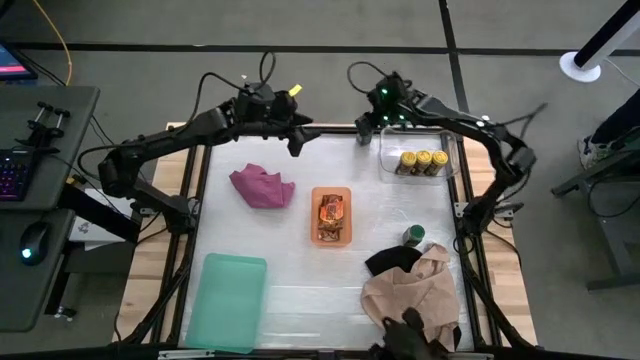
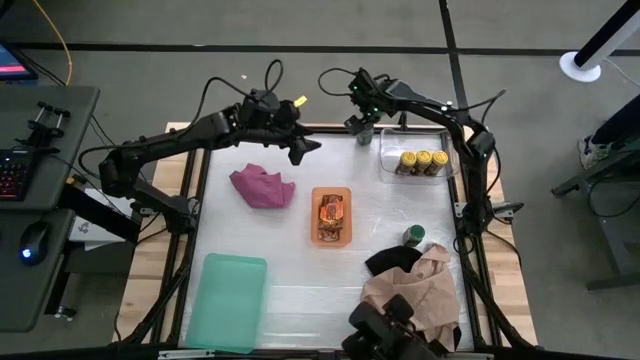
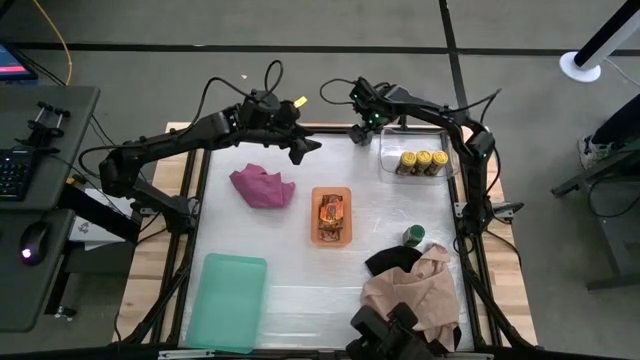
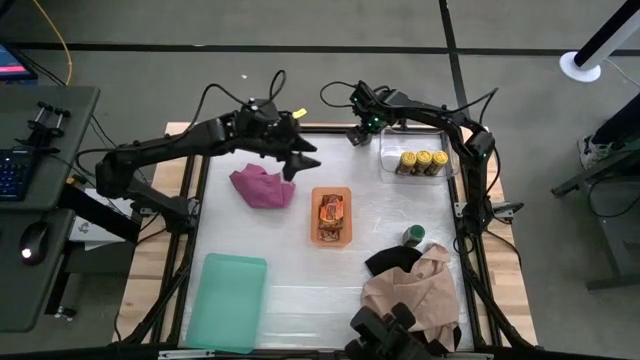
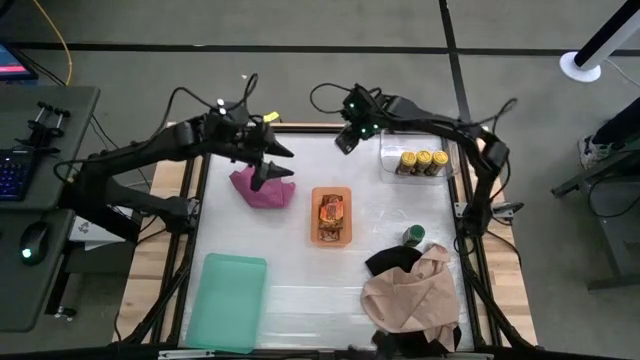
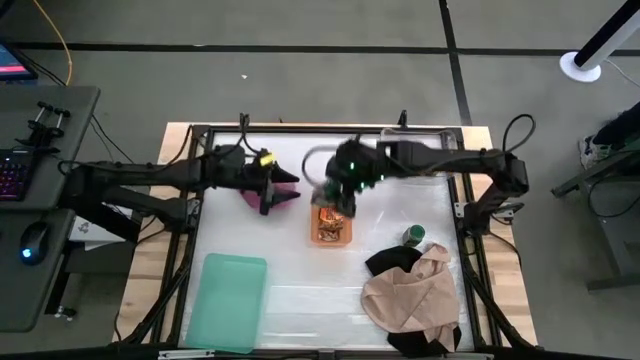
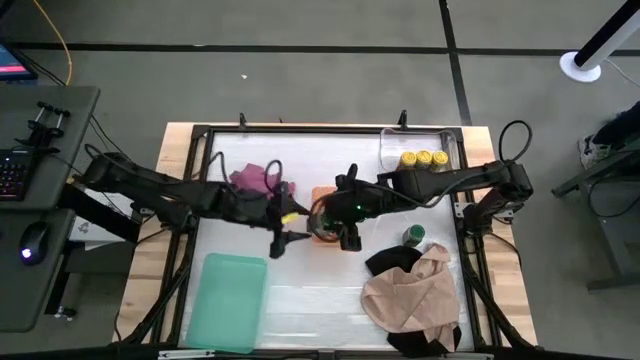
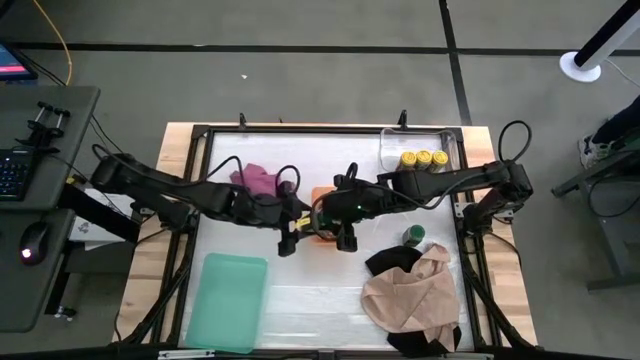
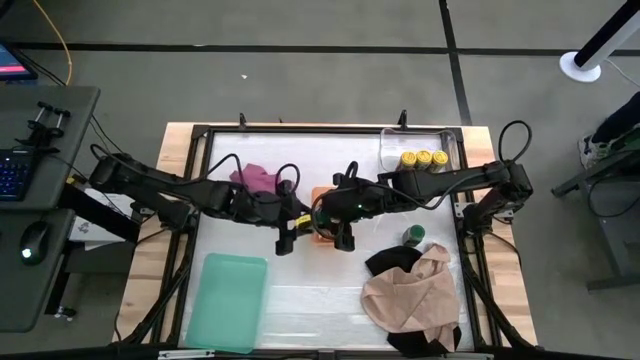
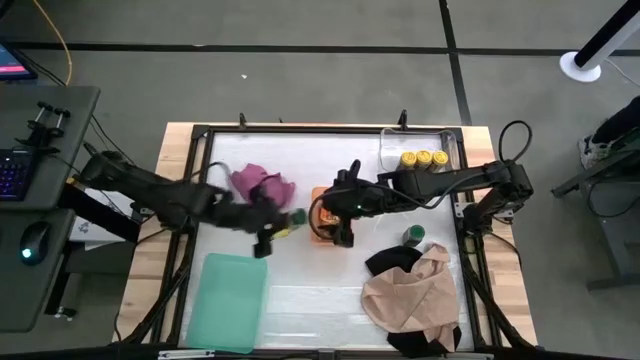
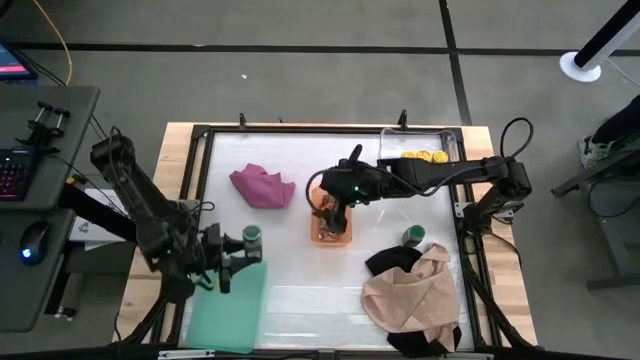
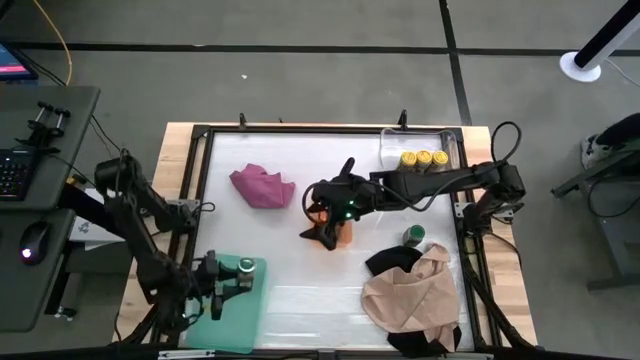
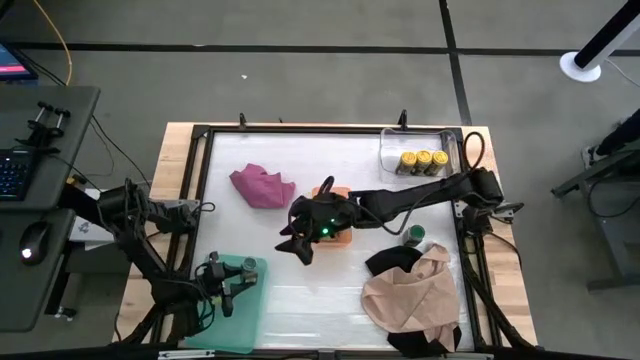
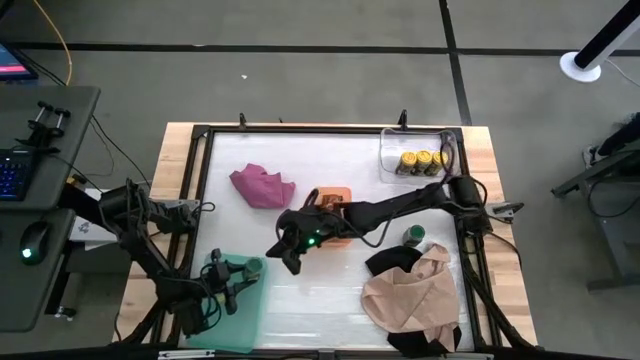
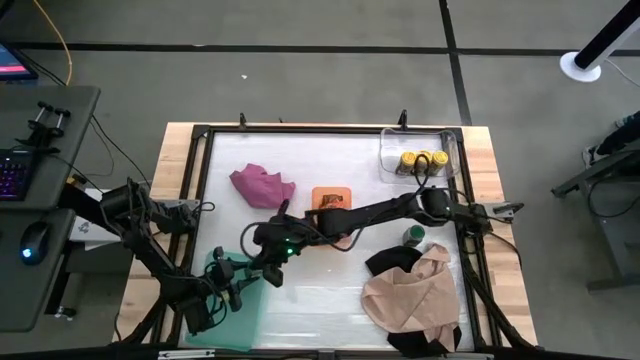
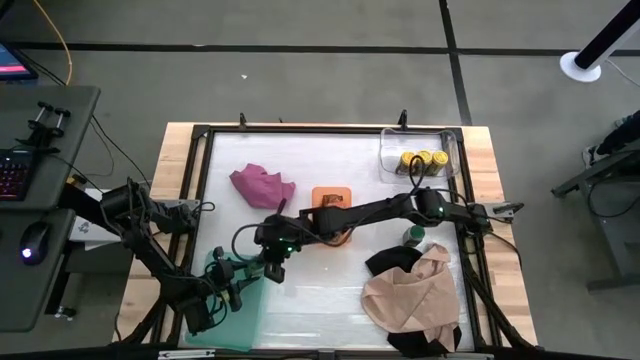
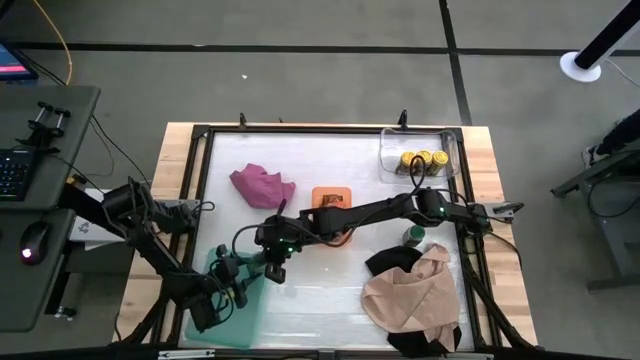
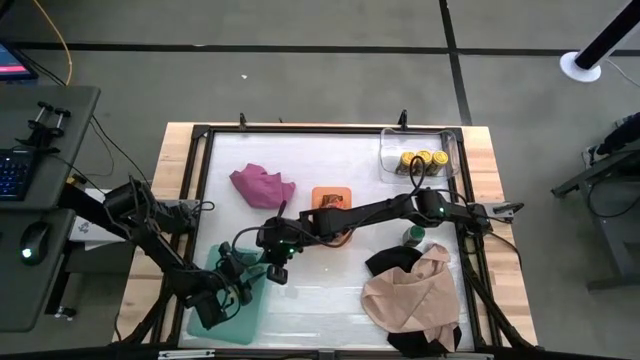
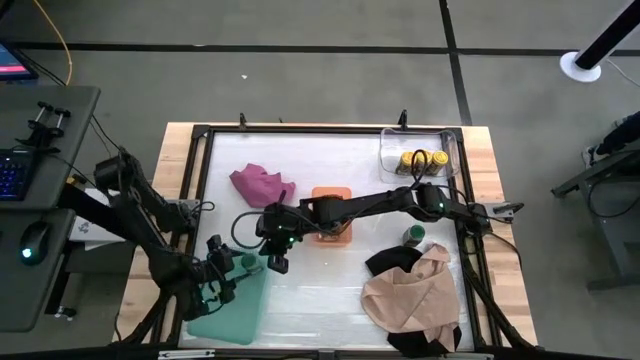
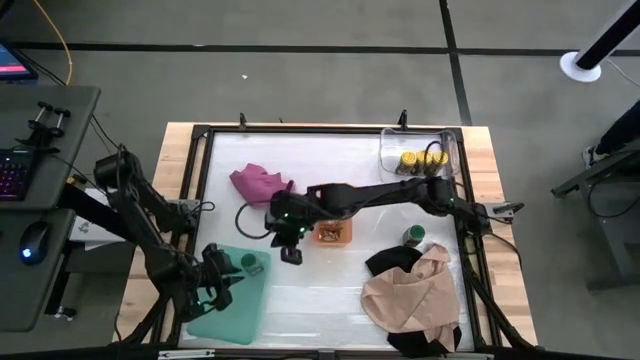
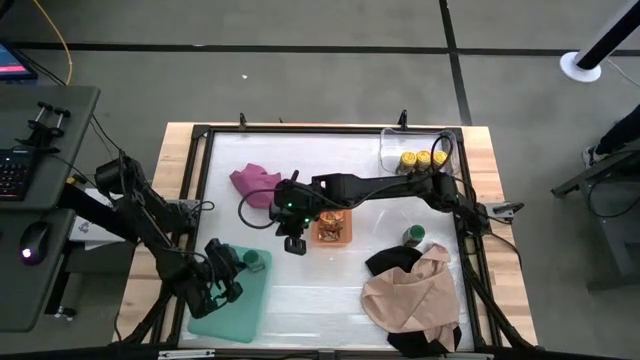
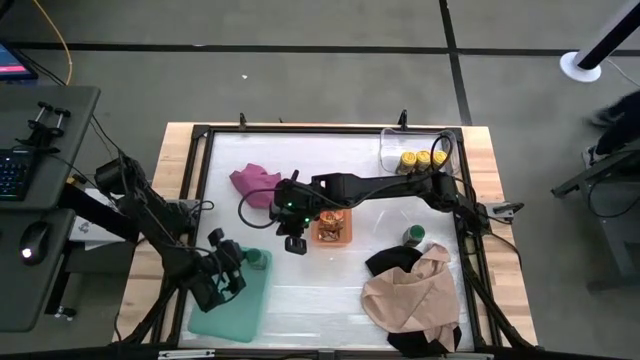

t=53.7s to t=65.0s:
Task: Sort spices by type
Put the top green seasoning bottle into the green bin

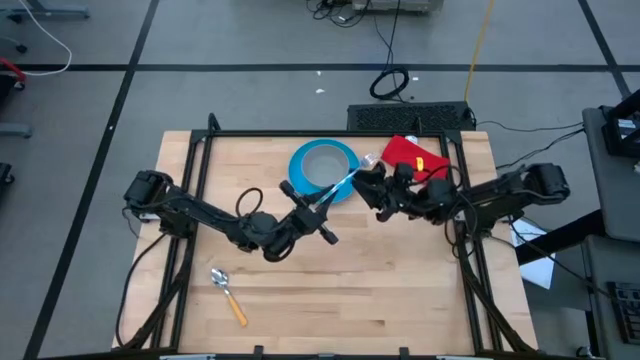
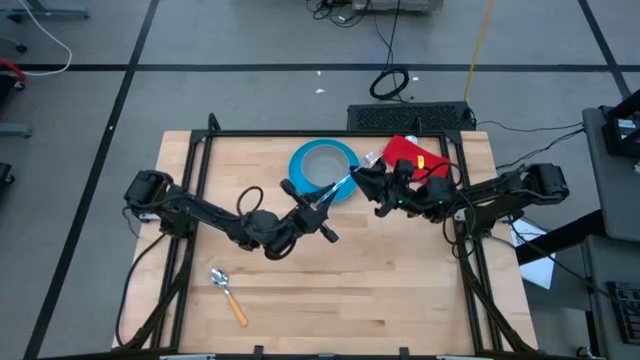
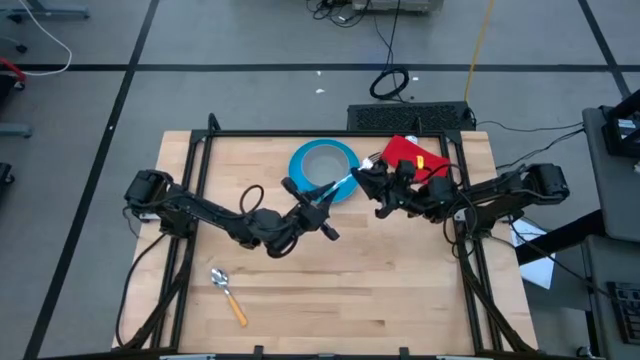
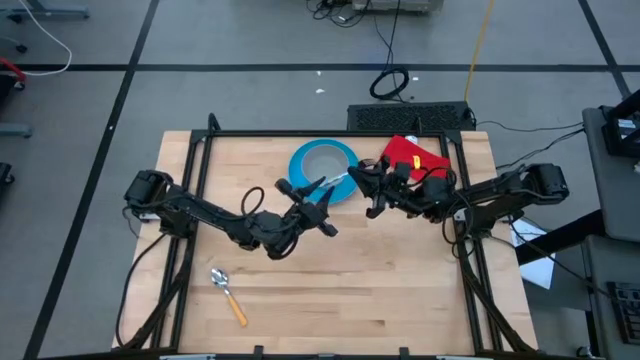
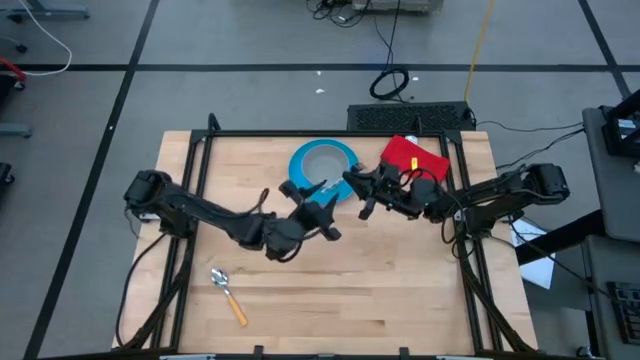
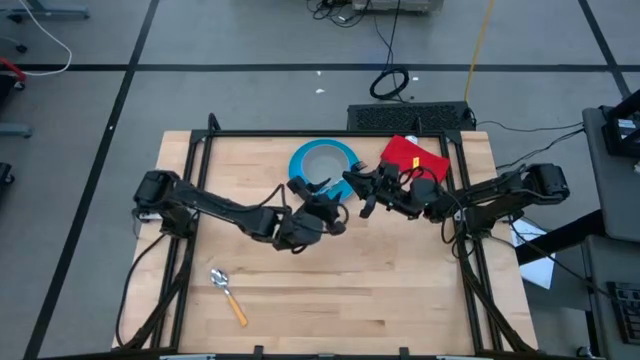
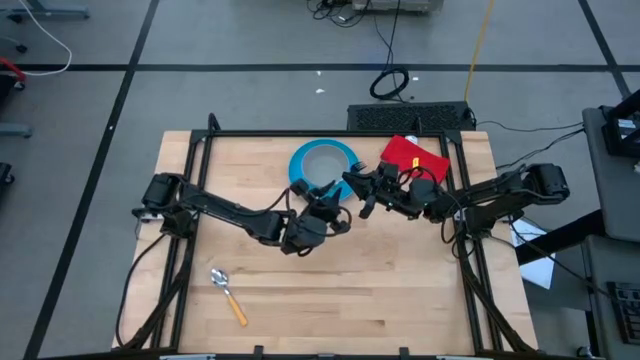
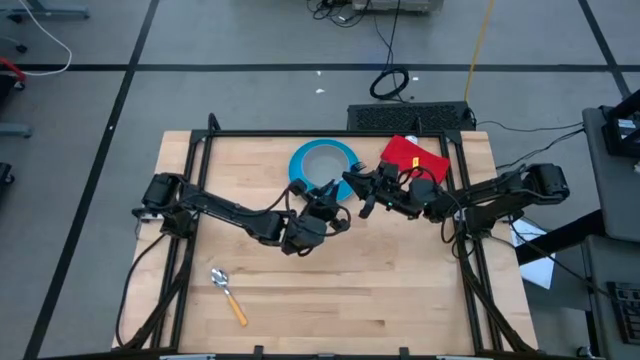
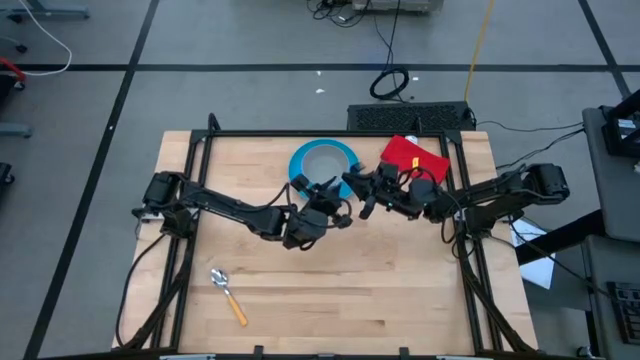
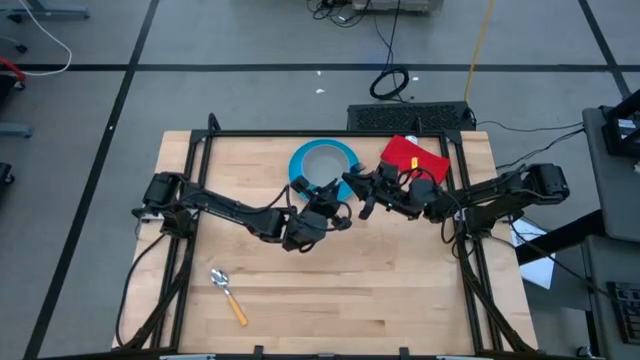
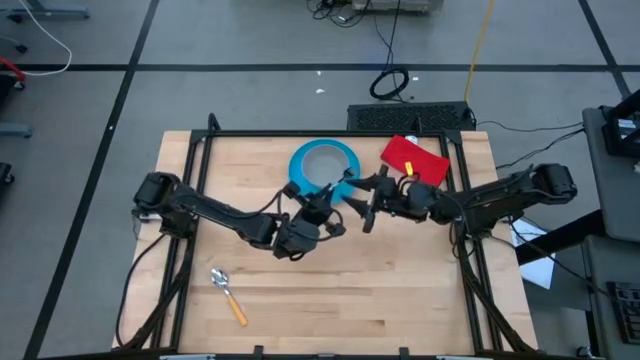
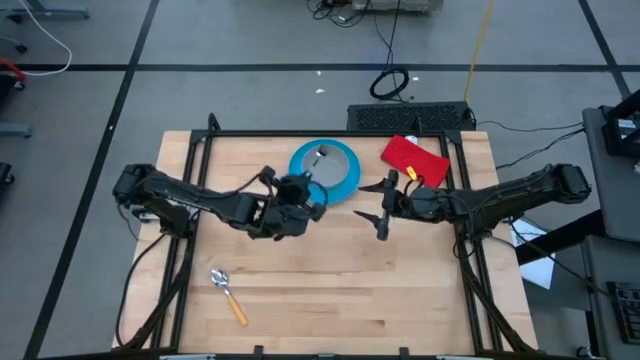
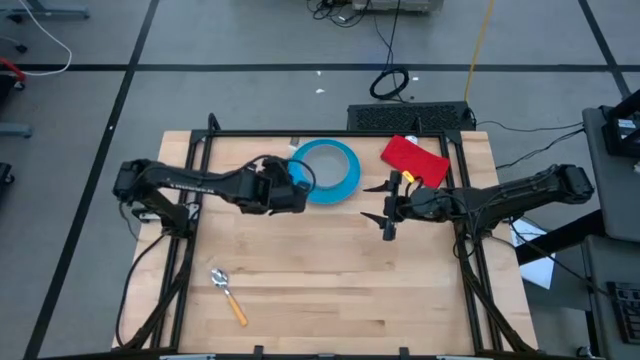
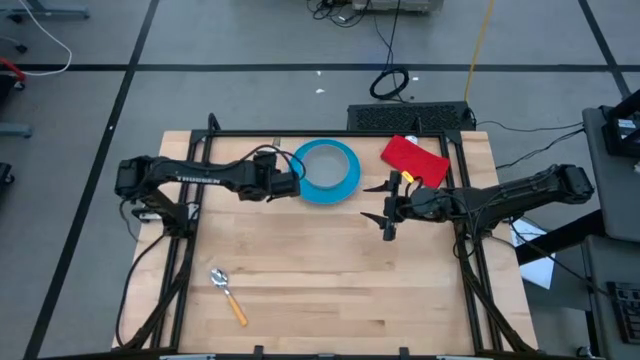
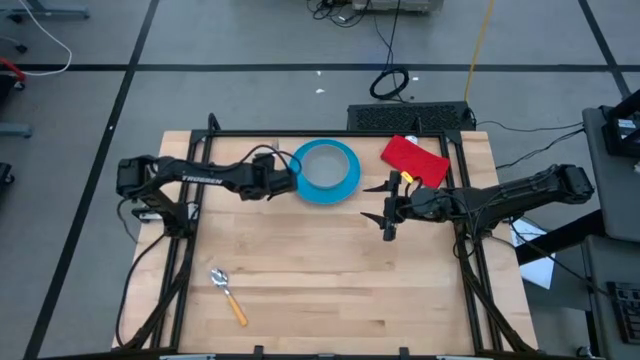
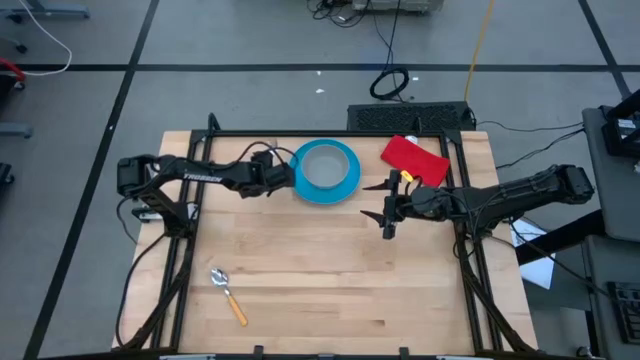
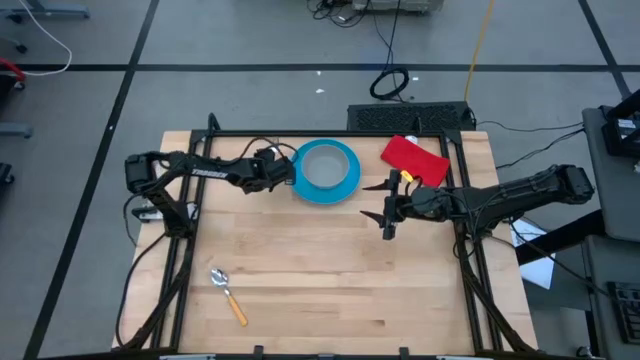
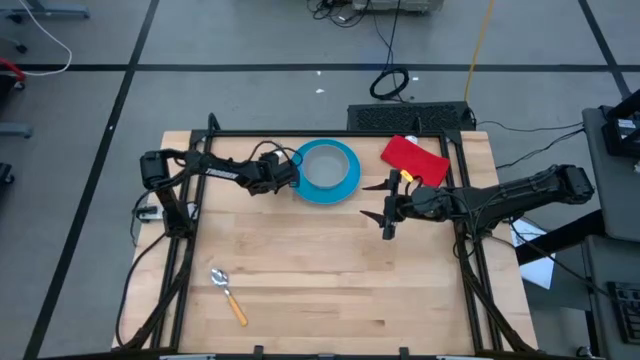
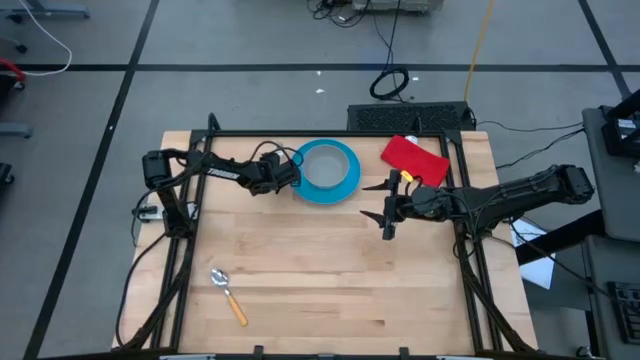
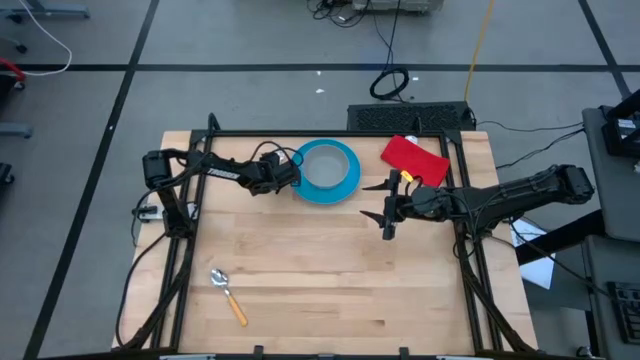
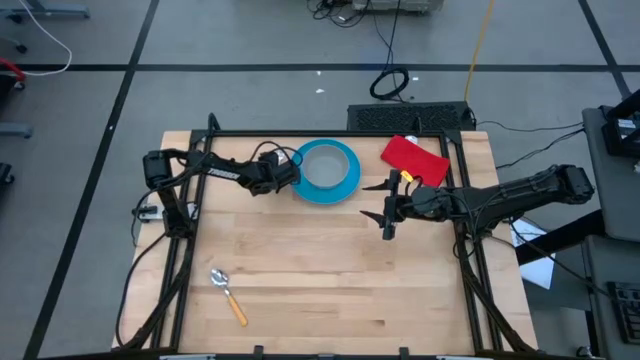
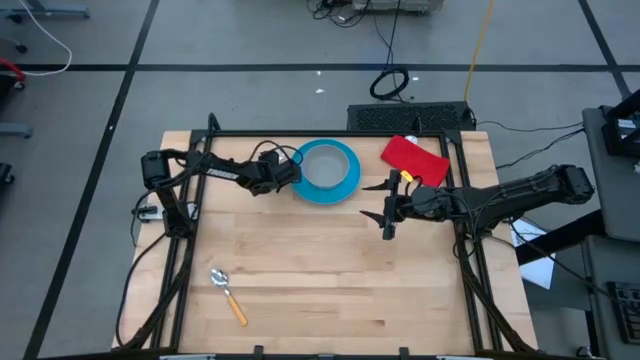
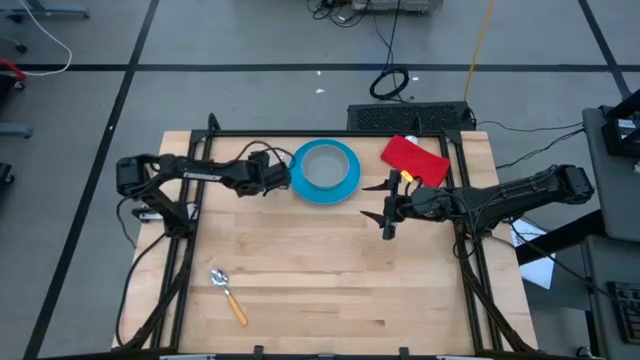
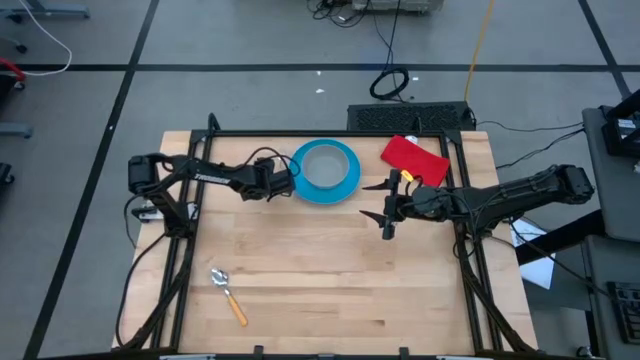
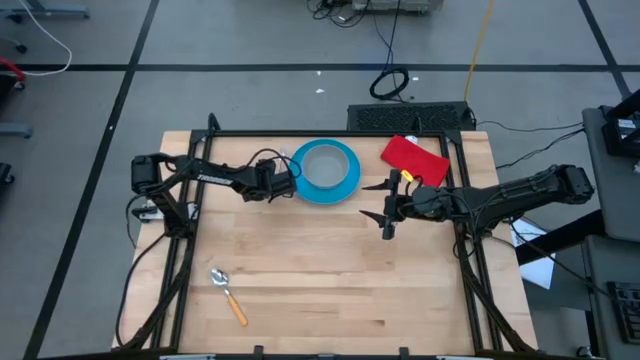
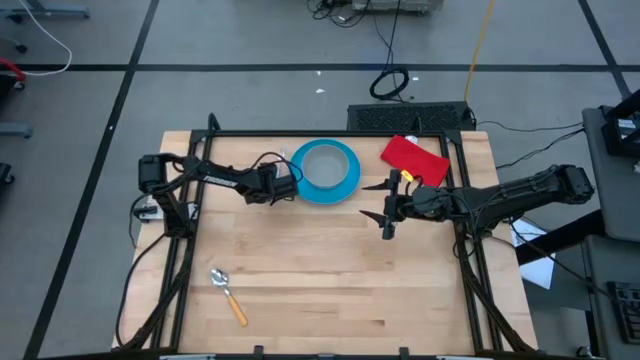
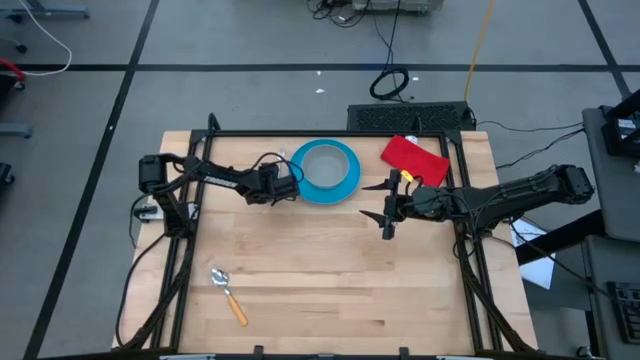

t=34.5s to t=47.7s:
Task: Pick and place plate/cup/fork/spoon on tray
Put the blue patterned fork beside the blue plate
